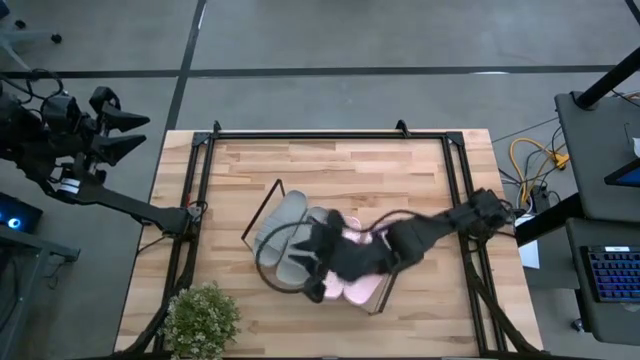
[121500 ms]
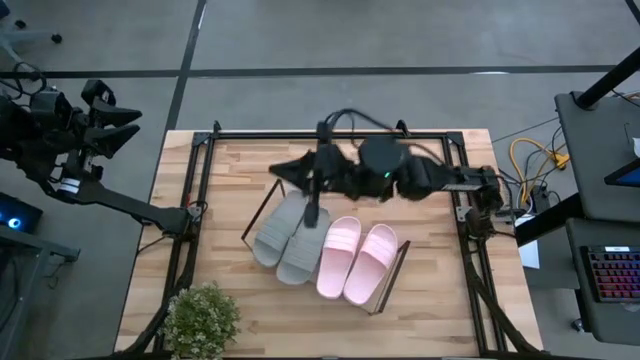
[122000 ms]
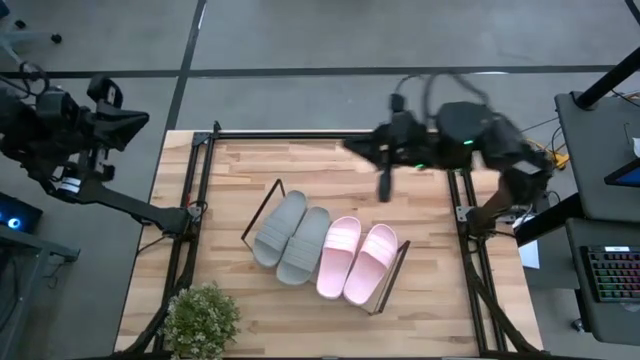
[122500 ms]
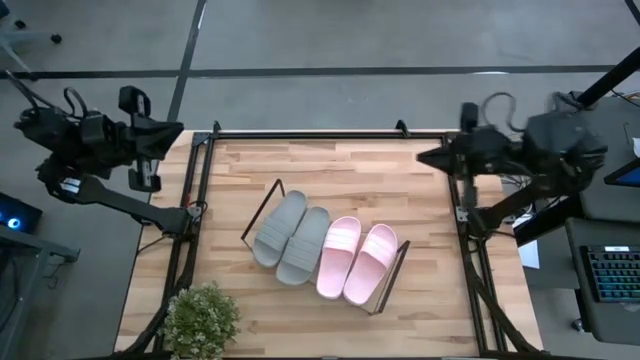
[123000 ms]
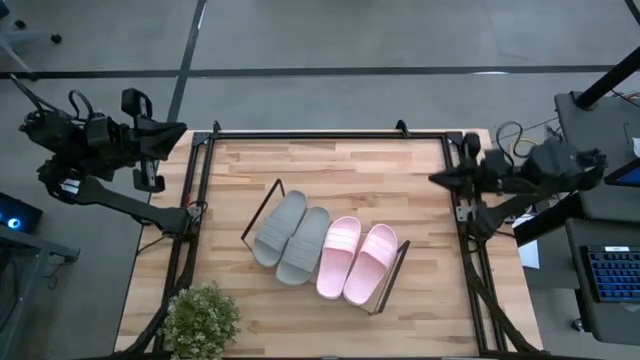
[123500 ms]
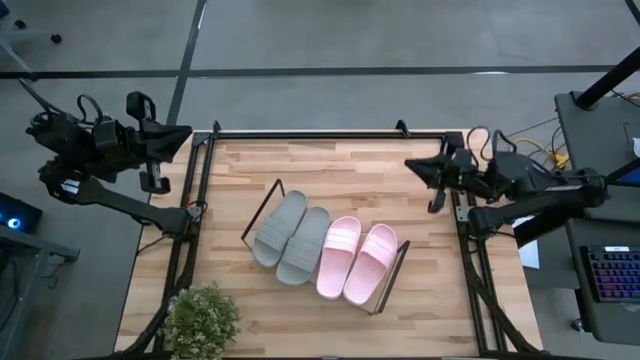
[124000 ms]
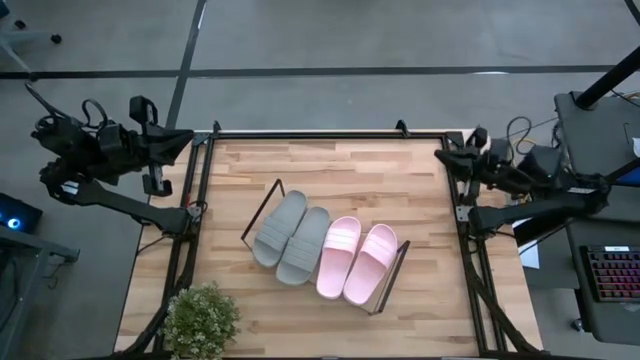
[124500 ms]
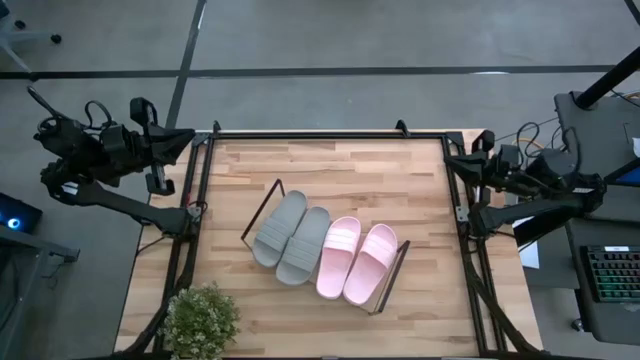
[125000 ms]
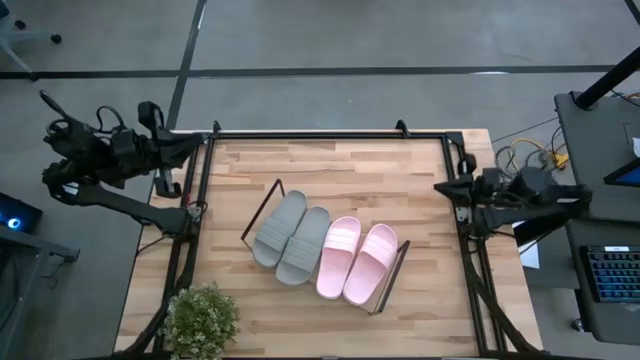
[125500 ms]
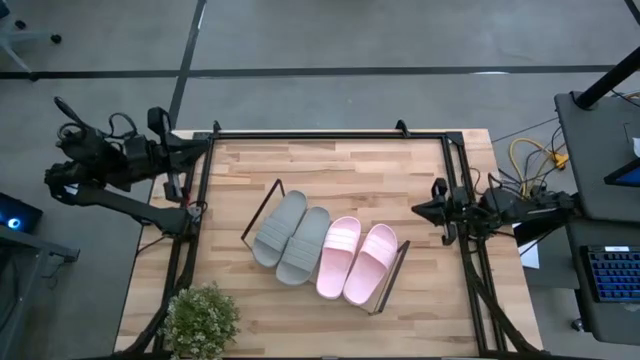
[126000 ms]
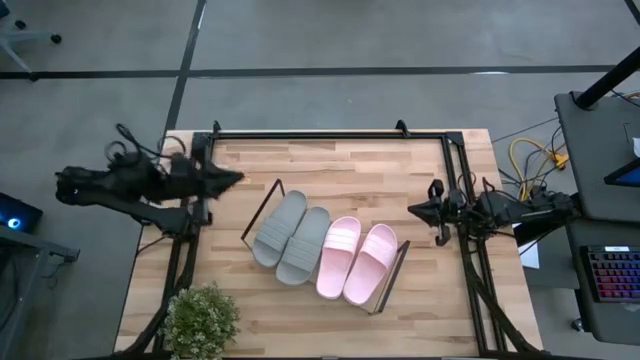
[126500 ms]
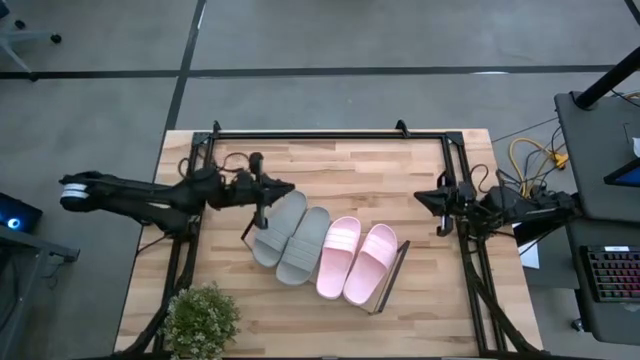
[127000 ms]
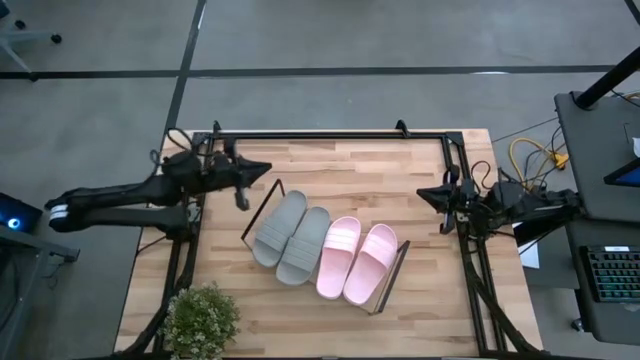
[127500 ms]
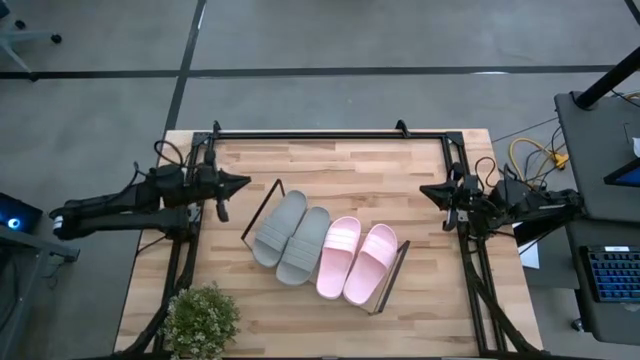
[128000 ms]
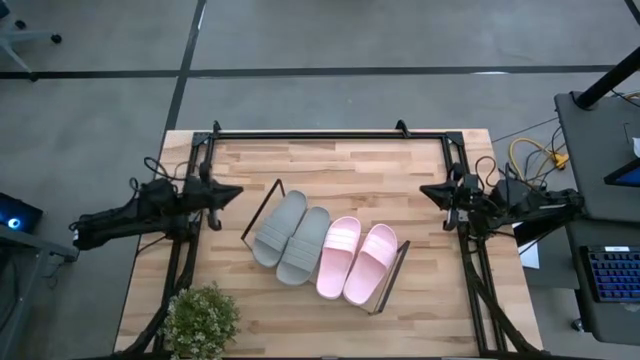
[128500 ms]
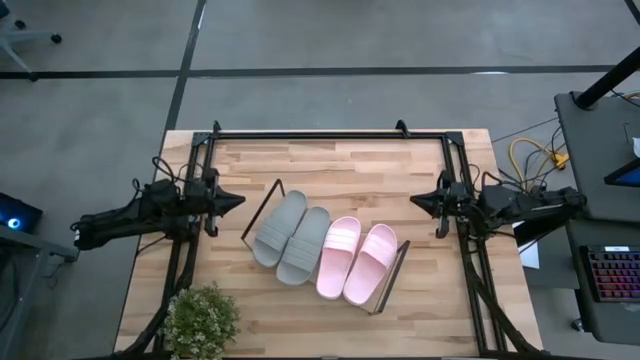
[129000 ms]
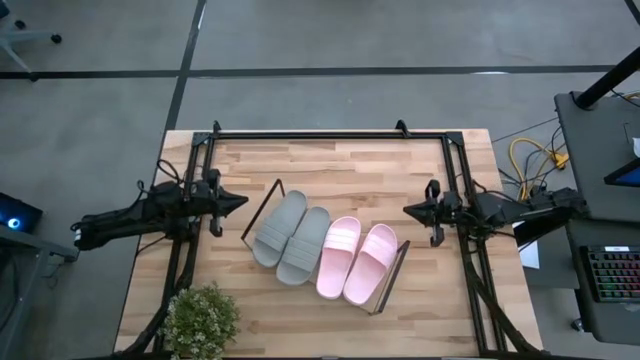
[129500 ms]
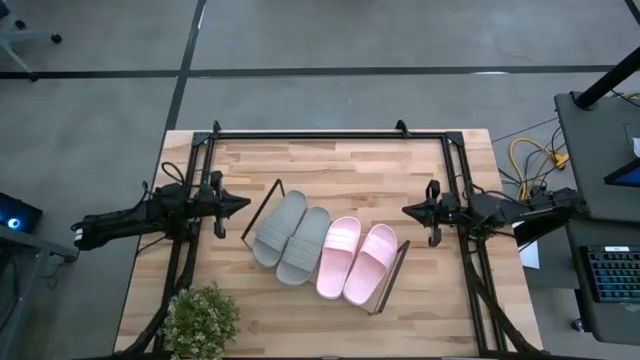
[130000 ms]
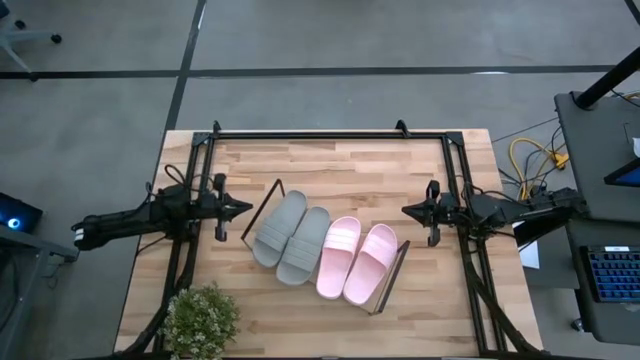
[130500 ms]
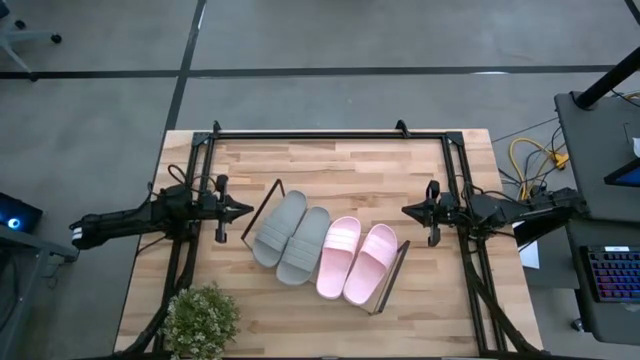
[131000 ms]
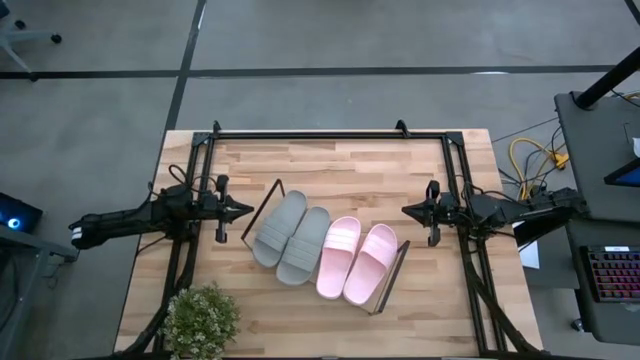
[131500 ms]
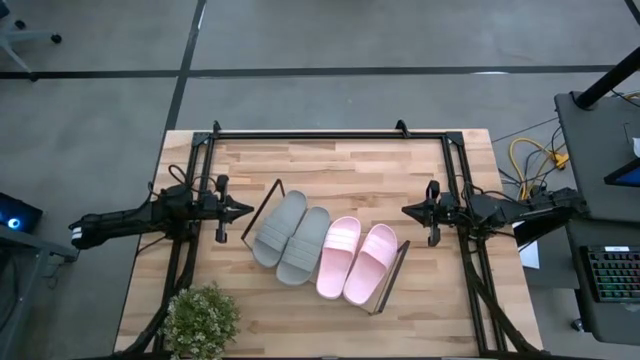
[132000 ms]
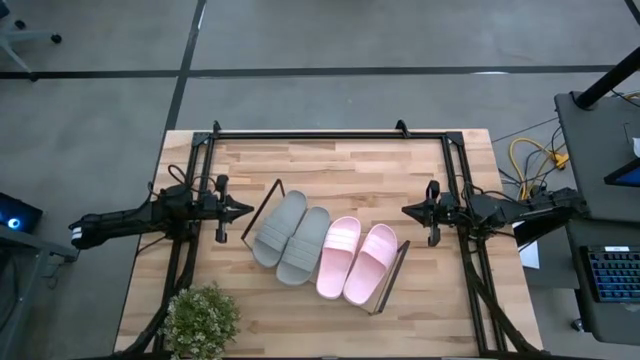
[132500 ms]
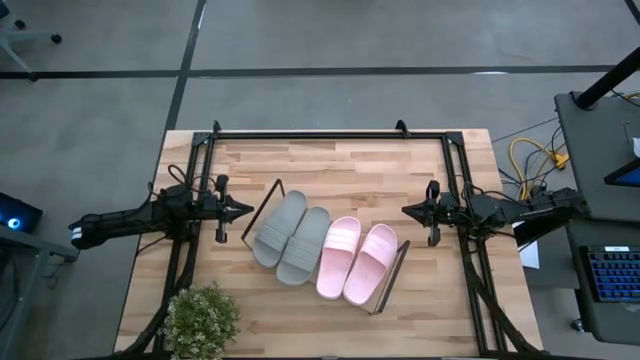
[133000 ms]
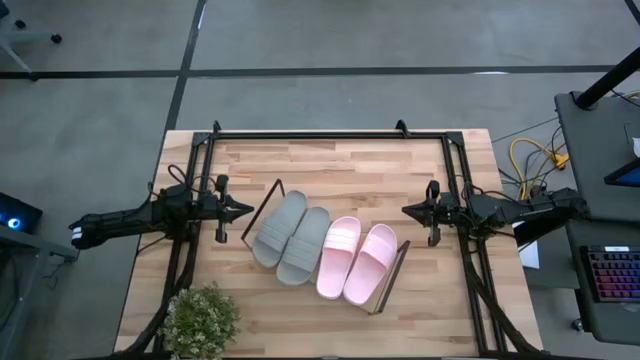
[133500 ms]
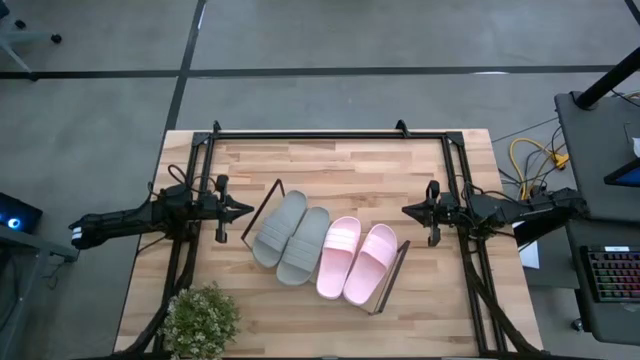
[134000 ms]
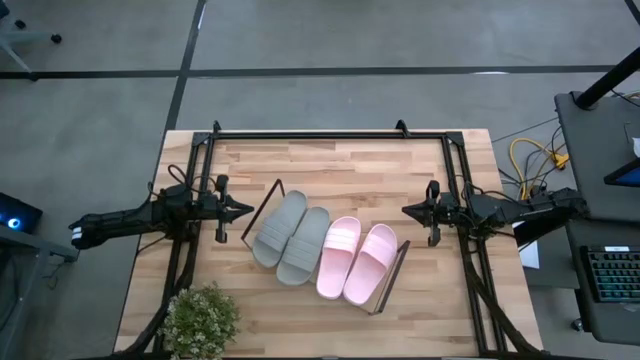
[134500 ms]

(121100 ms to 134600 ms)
Task: Pick and place slides into the shelf
Return to Home Position

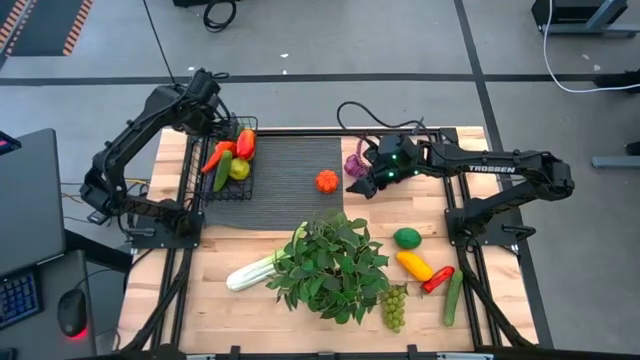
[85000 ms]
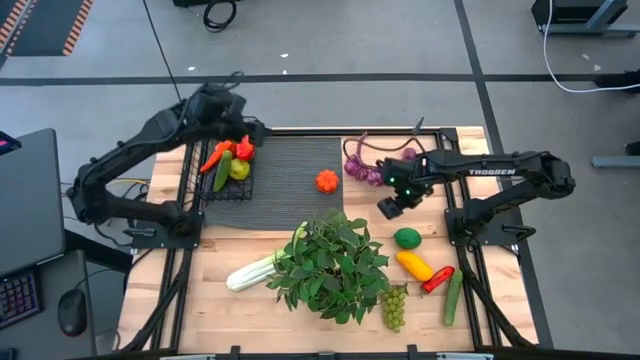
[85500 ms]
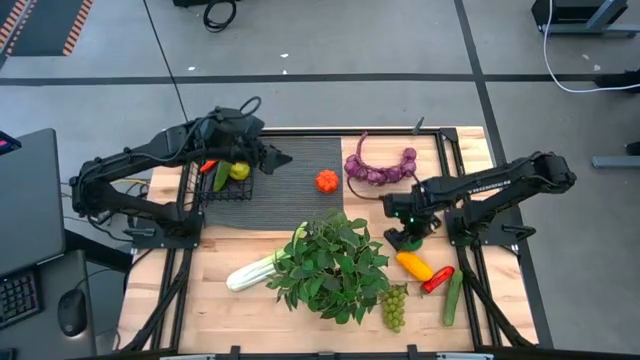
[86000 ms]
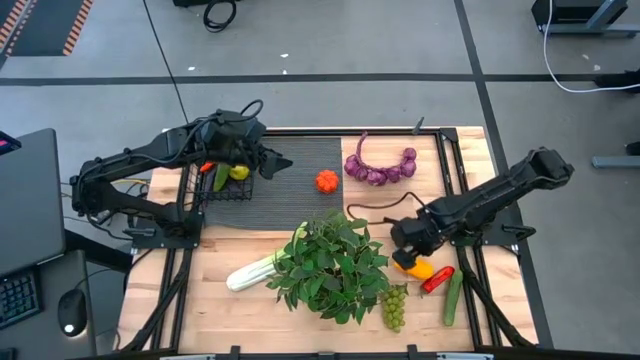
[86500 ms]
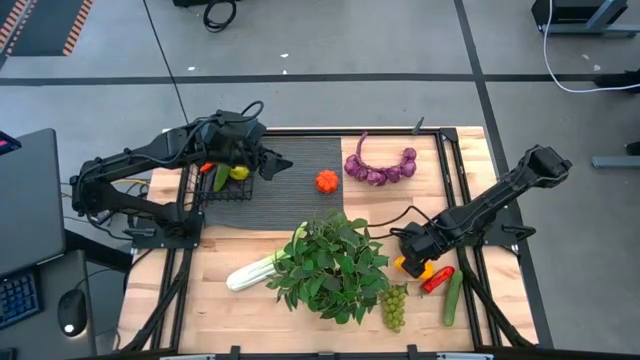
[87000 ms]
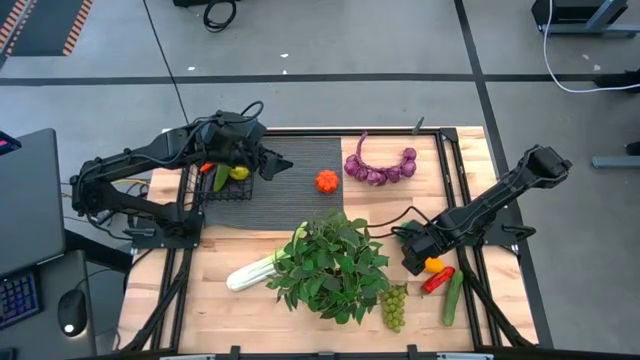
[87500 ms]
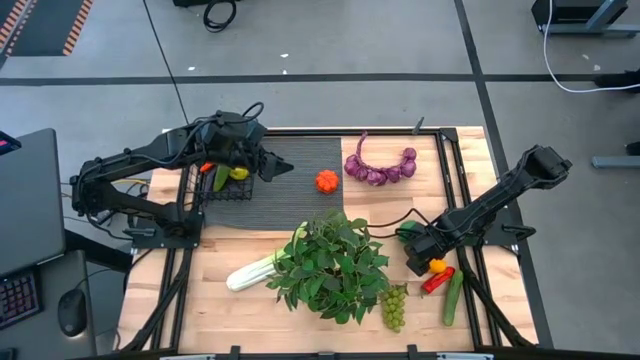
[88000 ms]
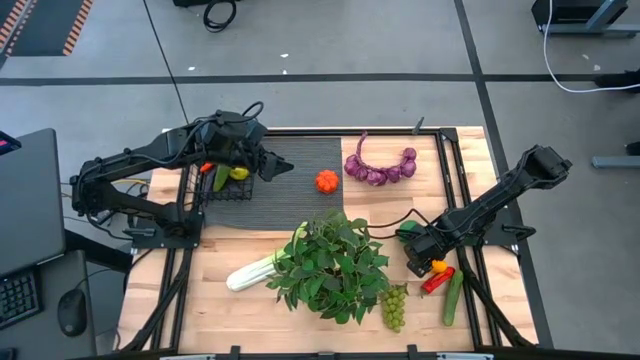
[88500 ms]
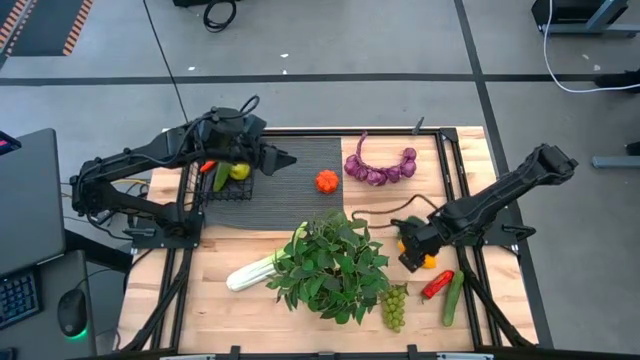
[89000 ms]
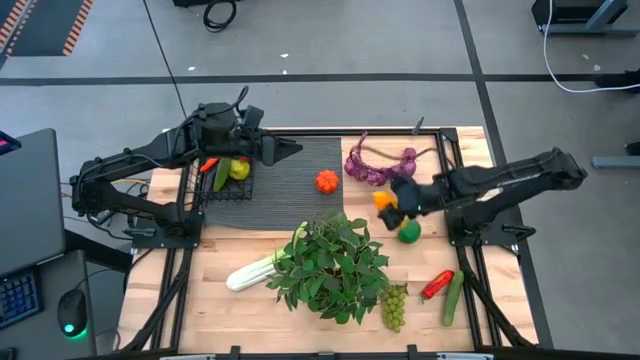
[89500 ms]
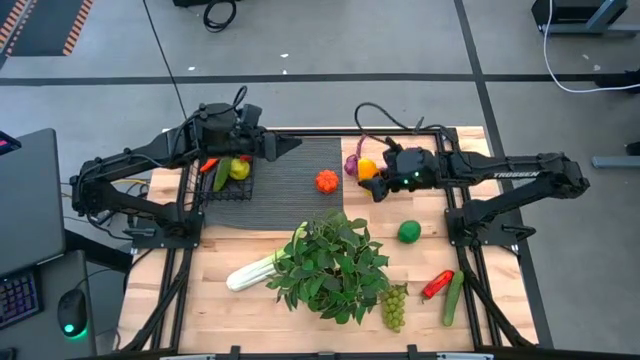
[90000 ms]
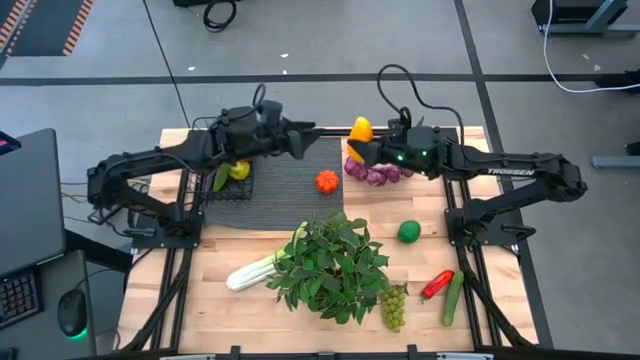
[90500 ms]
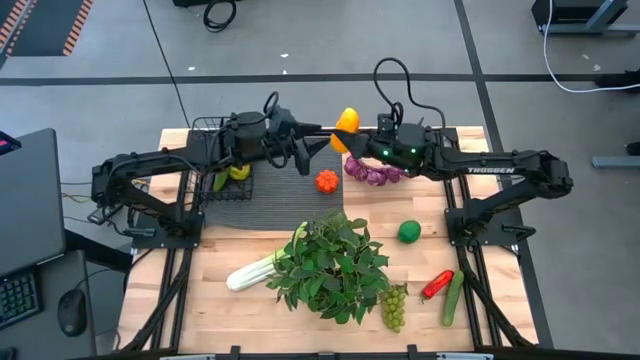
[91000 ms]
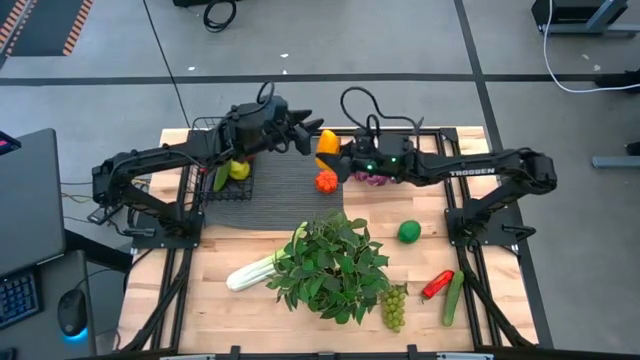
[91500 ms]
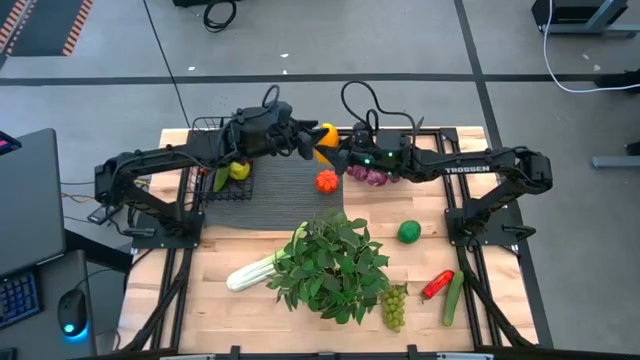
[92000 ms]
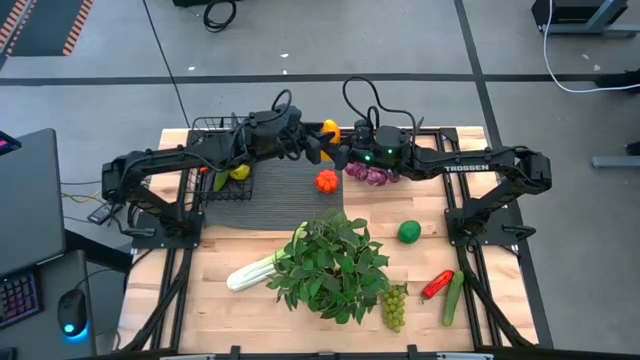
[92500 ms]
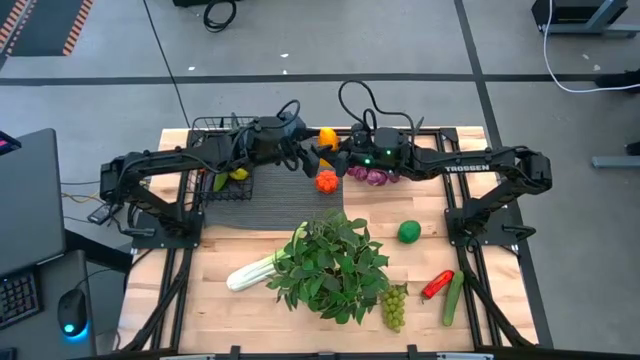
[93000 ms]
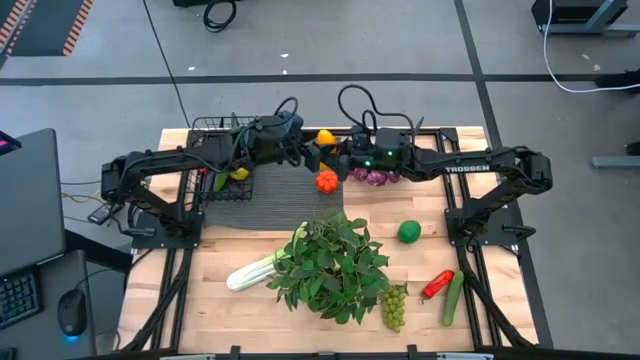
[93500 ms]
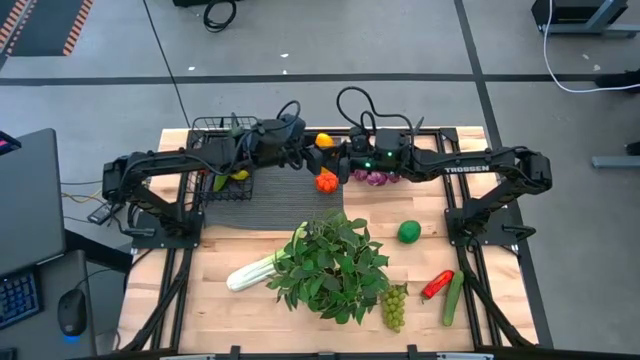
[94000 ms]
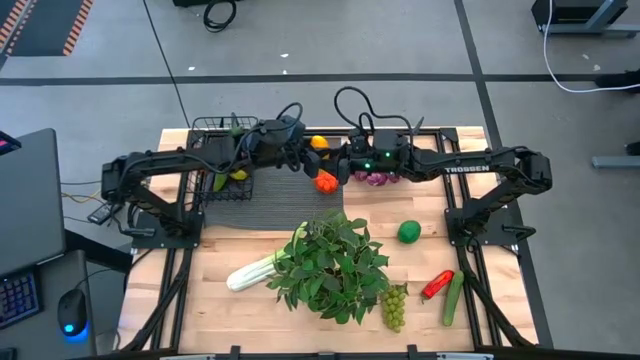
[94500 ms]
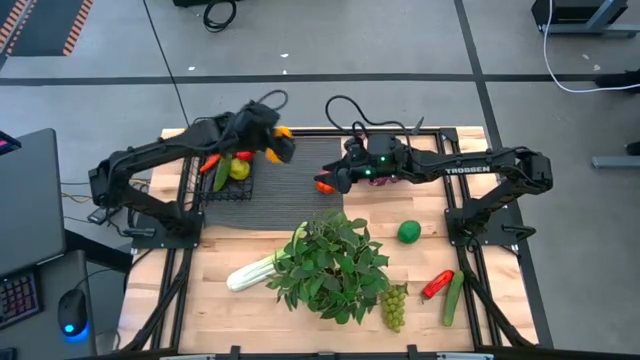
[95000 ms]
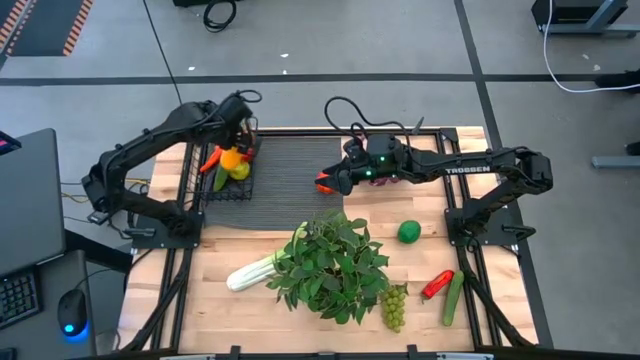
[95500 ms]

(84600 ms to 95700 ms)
Task: Build produce basket
Put the yellow mango into the wire basket
